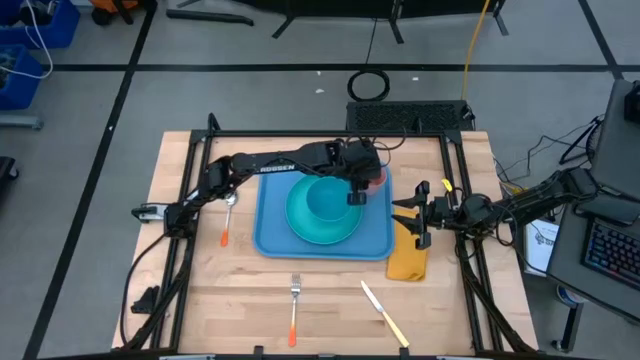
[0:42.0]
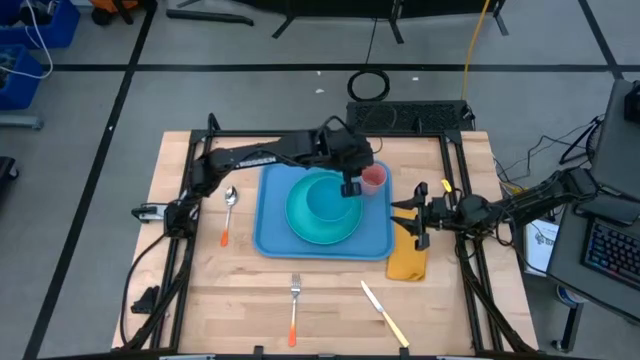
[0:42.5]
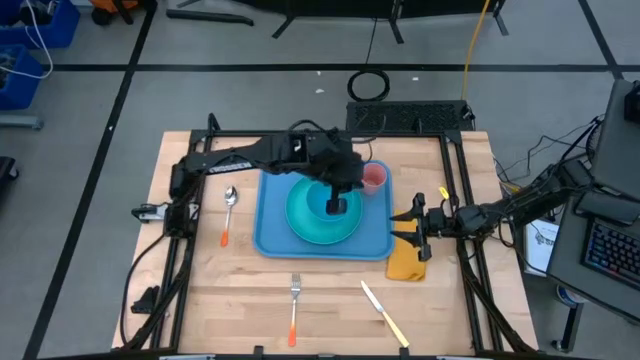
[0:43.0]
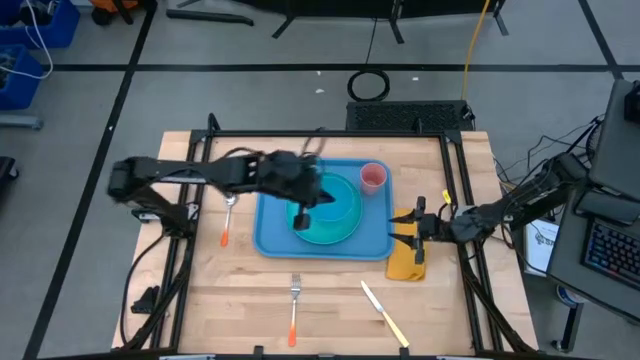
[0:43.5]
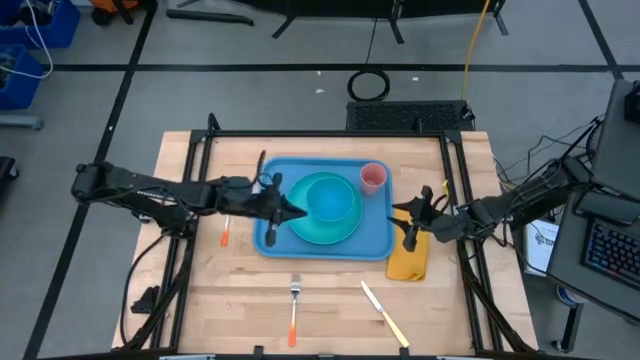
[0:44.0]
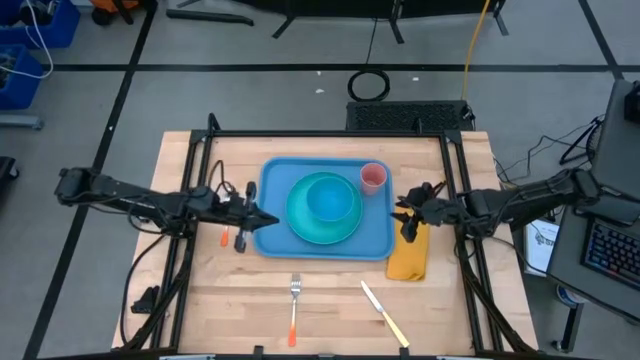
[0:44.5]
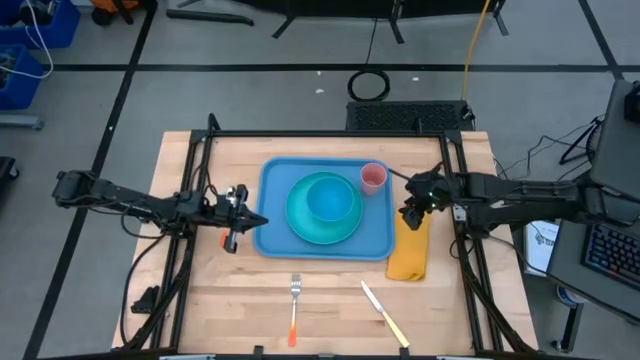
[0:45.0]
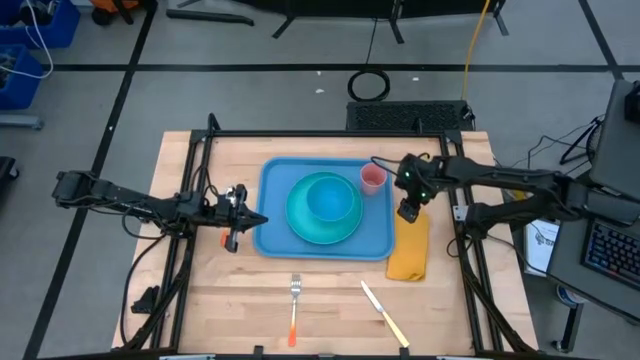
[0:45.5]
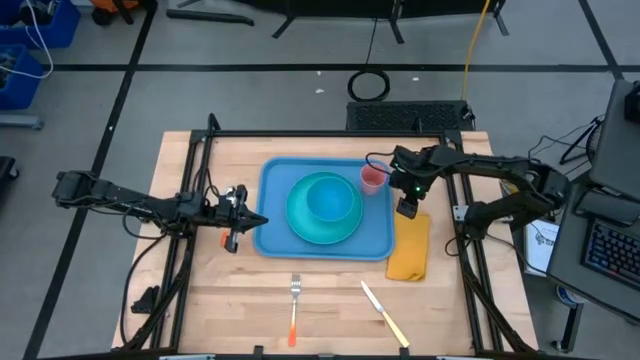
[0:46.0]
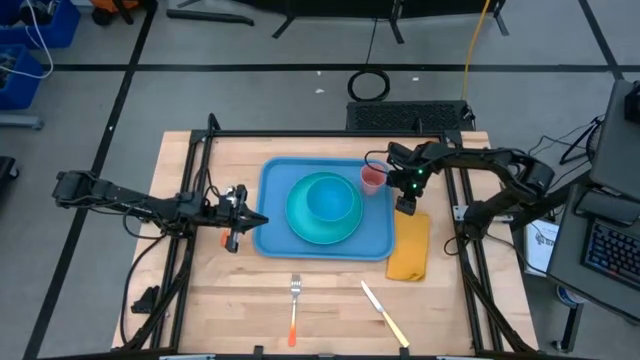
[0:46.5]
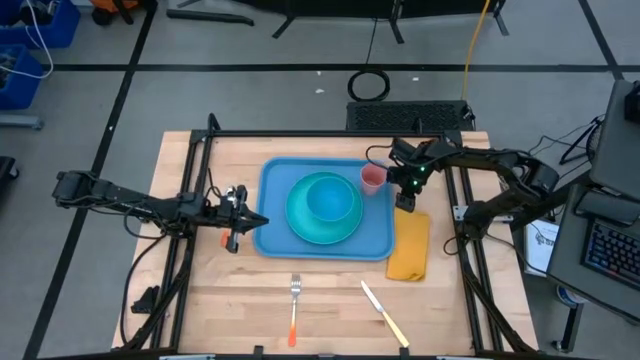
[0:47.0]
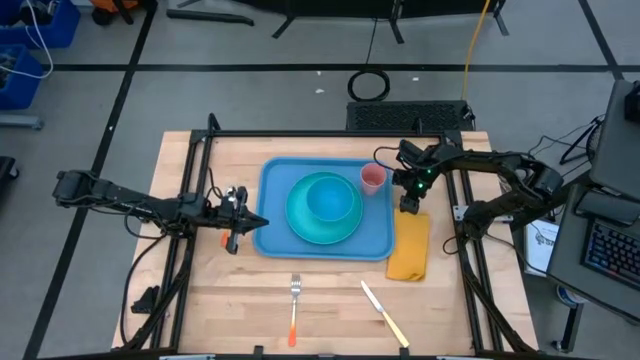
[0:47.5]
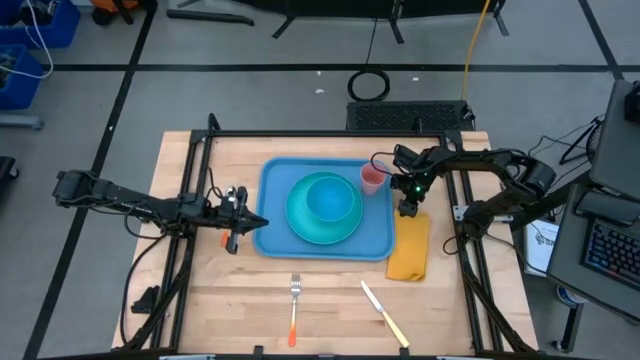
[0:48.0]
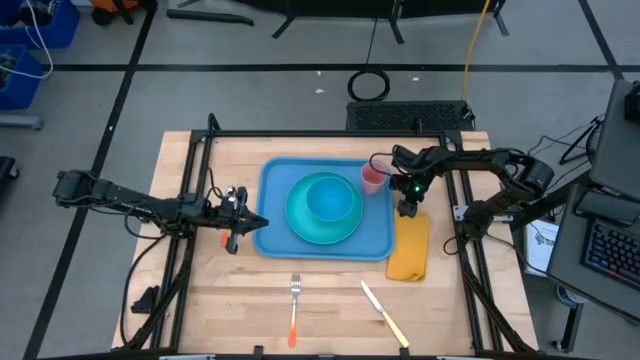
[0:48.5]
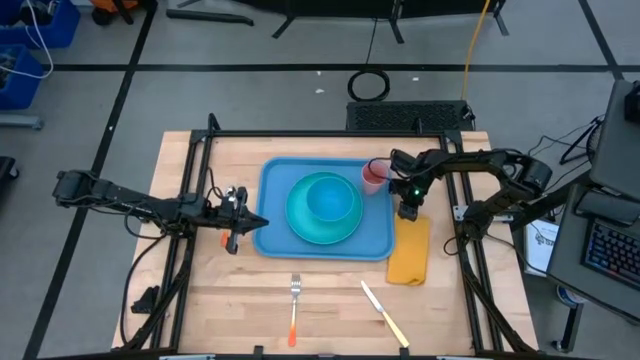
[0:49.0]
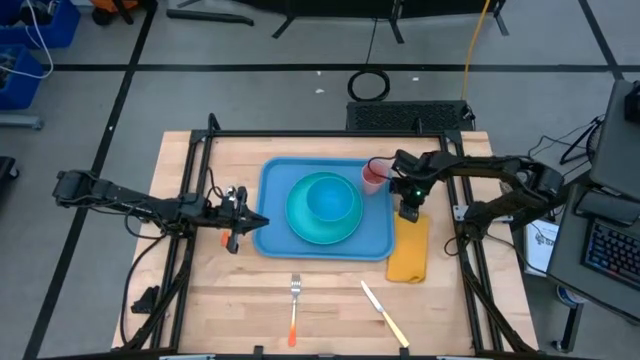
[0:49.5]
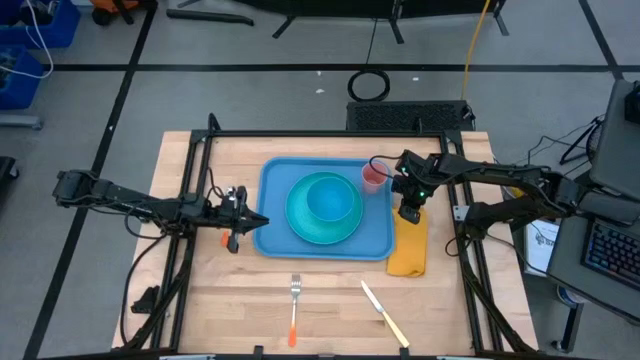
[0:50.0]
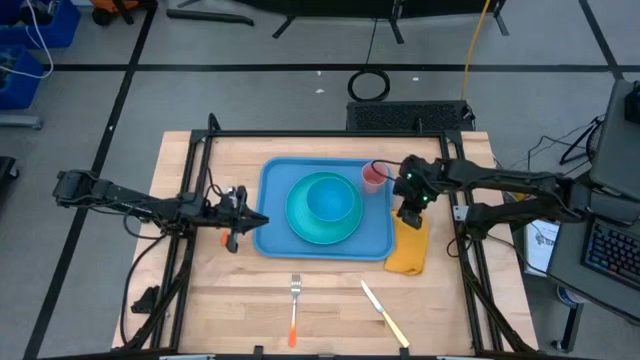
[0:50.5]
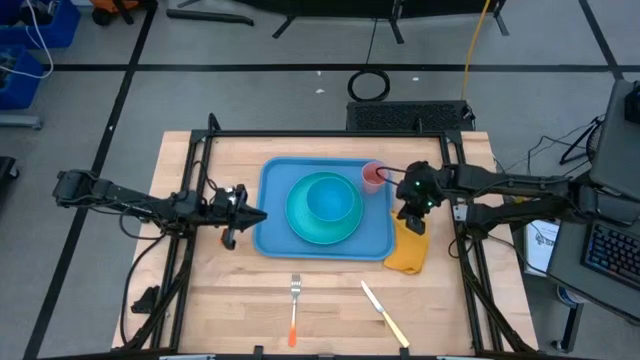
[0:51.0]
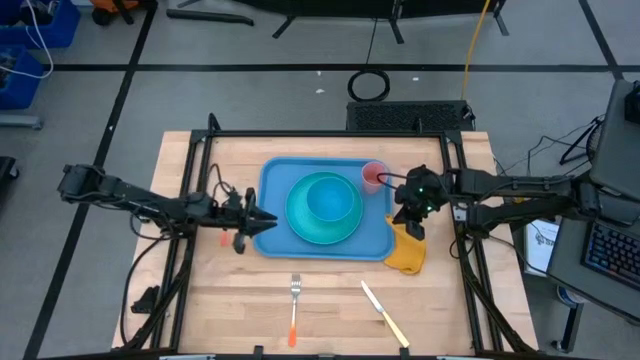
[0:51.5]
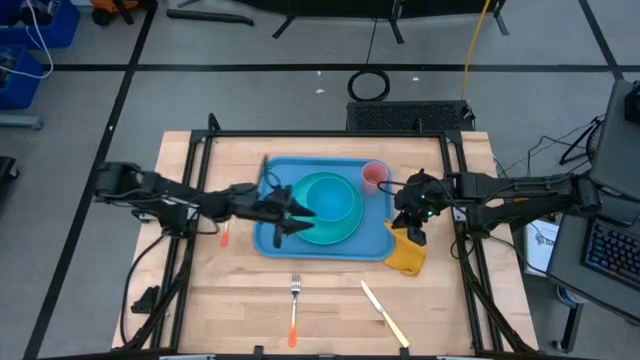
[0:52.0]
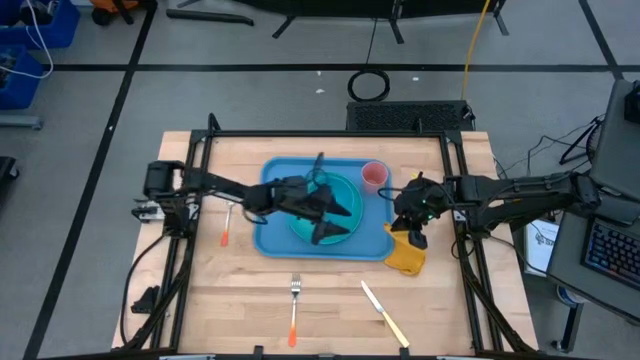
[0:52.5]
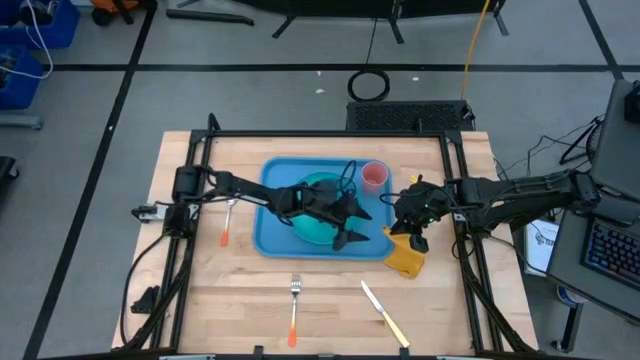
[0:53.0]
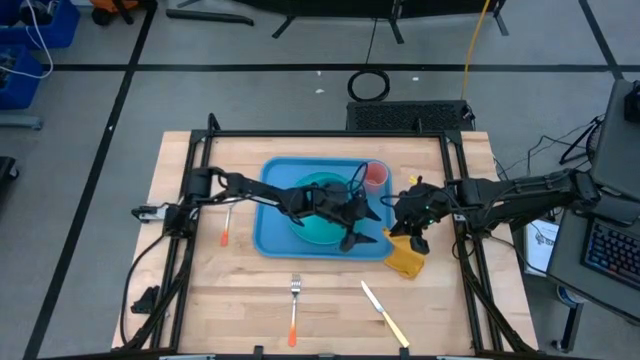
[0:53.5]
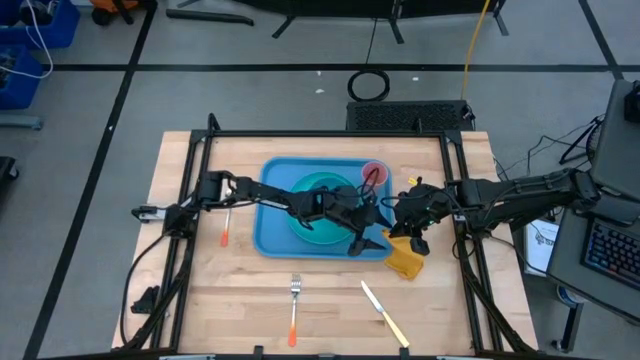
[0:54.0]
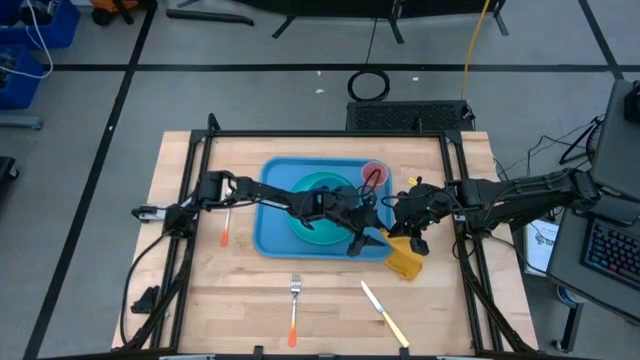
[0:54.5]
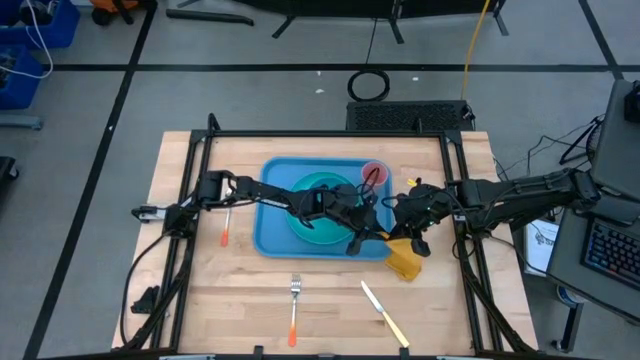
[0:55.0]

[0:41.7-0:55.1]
Task: Set up tray
Put the yellow napkin to the left of the green plate on the blue serving tray

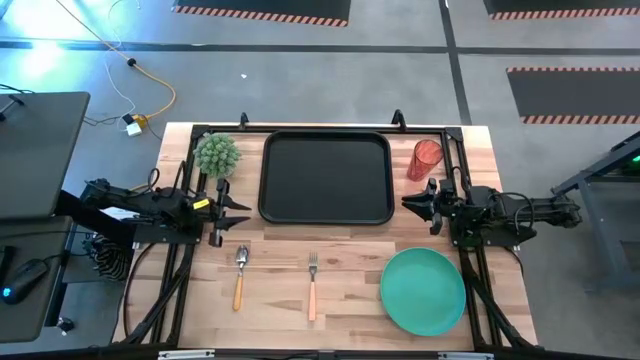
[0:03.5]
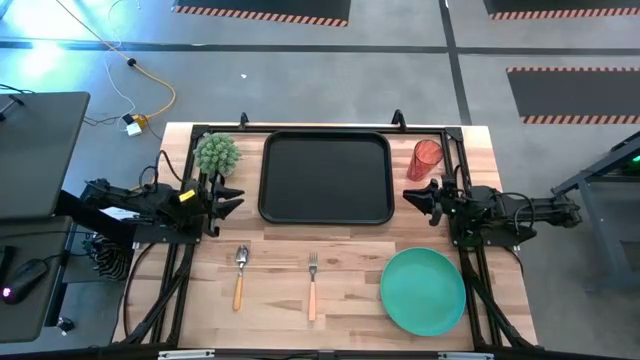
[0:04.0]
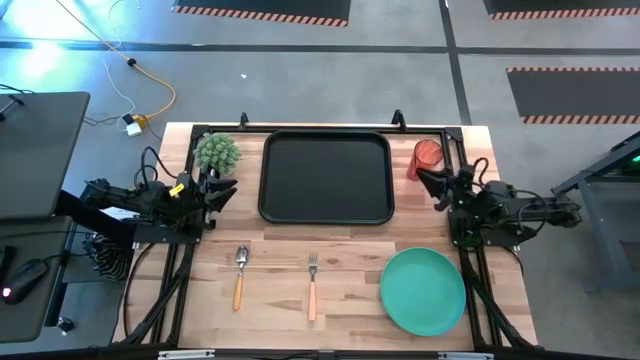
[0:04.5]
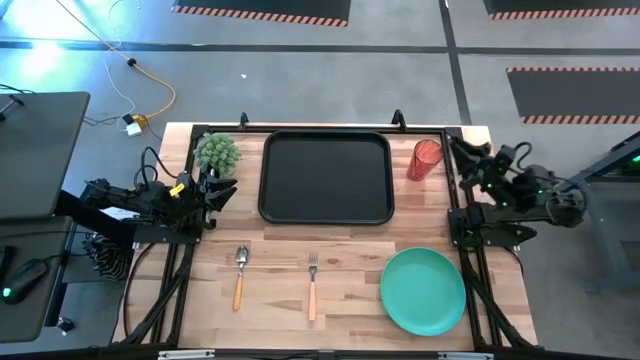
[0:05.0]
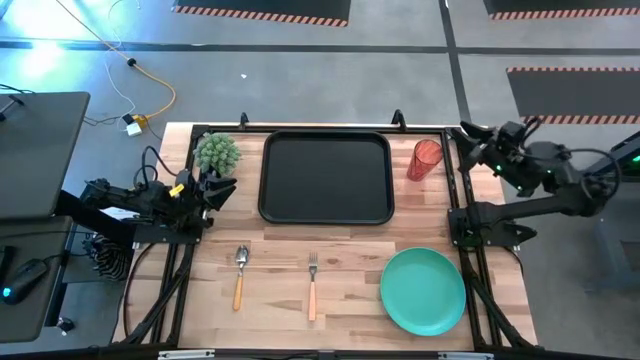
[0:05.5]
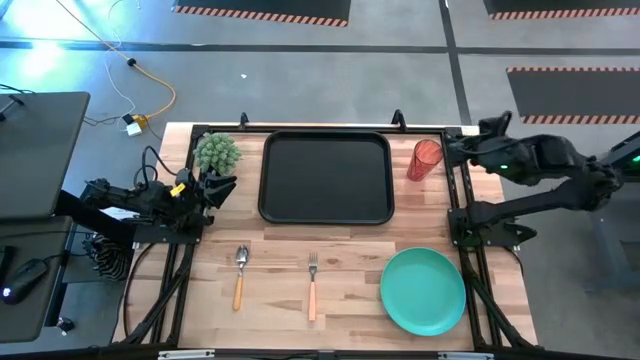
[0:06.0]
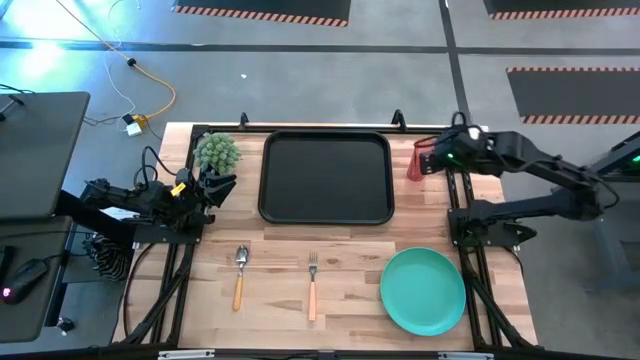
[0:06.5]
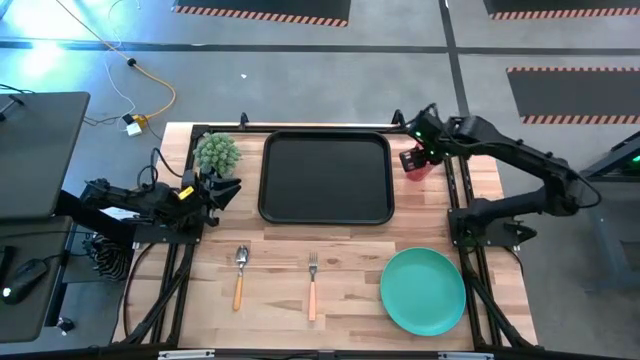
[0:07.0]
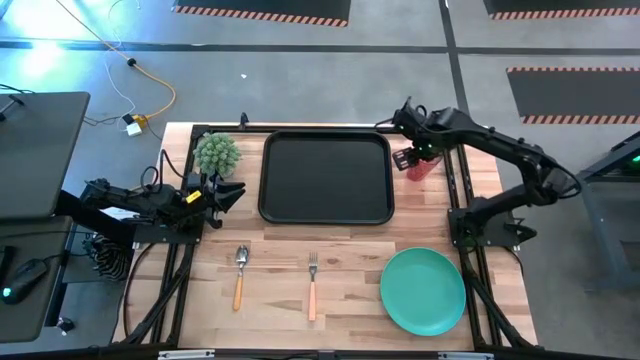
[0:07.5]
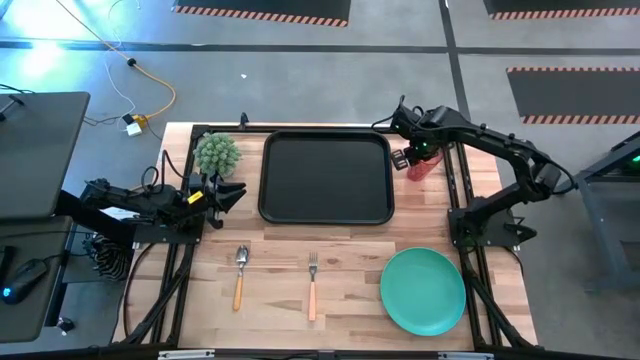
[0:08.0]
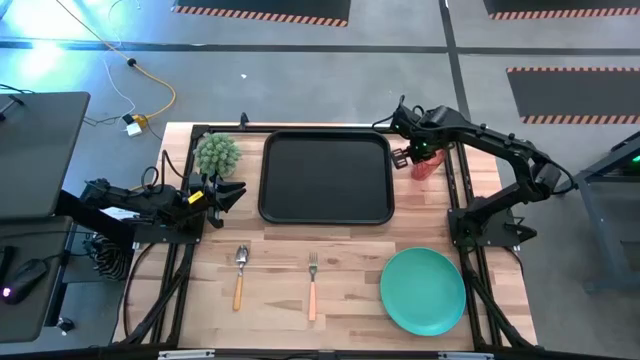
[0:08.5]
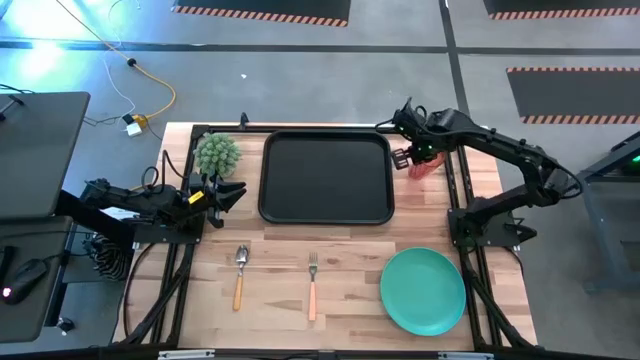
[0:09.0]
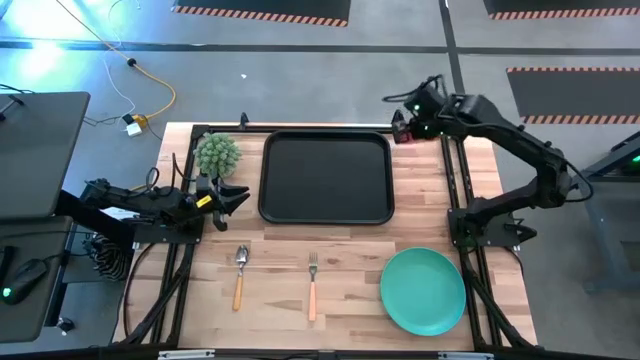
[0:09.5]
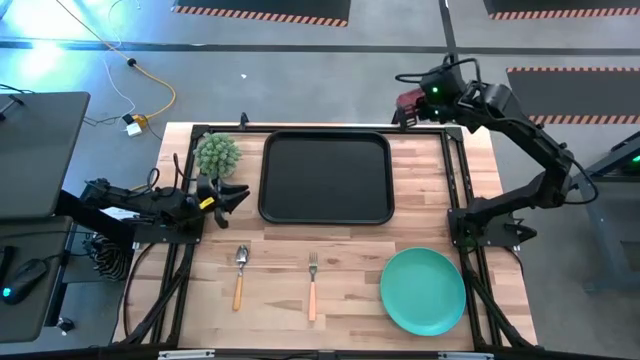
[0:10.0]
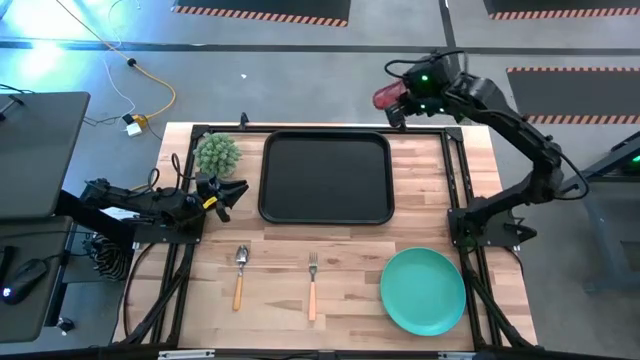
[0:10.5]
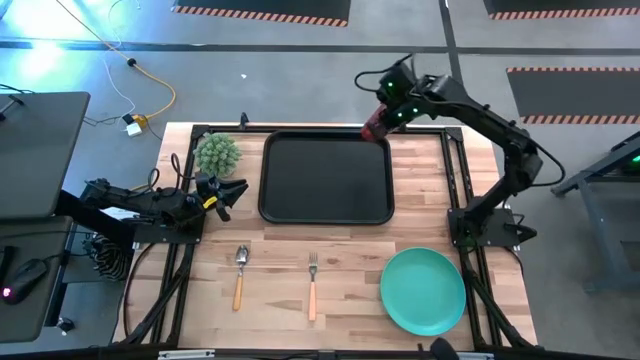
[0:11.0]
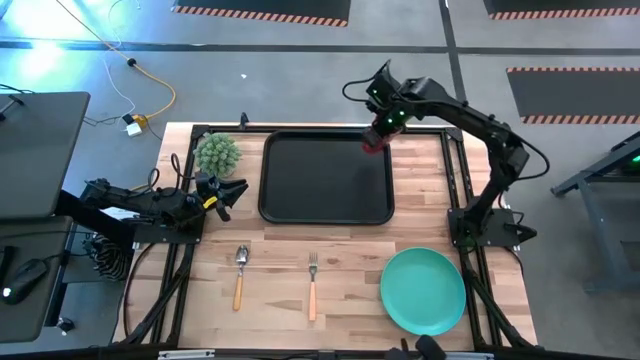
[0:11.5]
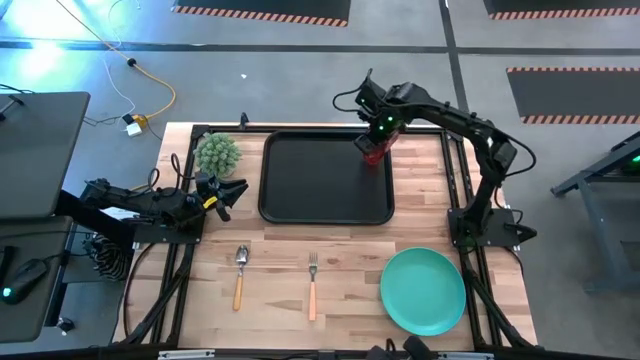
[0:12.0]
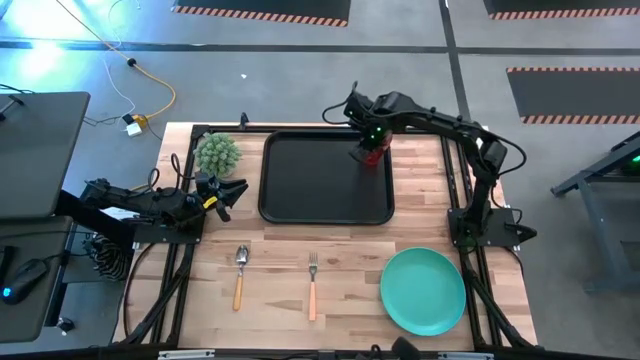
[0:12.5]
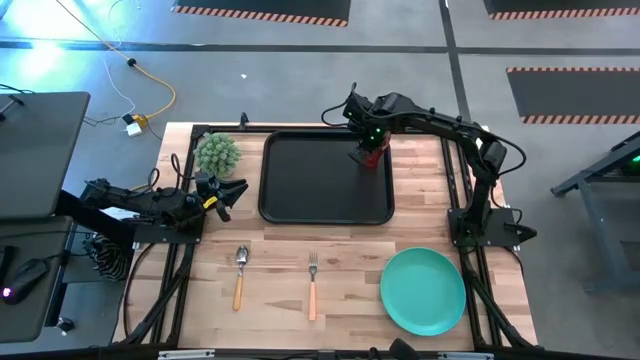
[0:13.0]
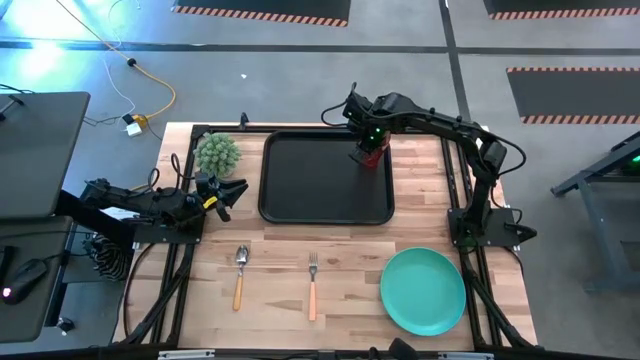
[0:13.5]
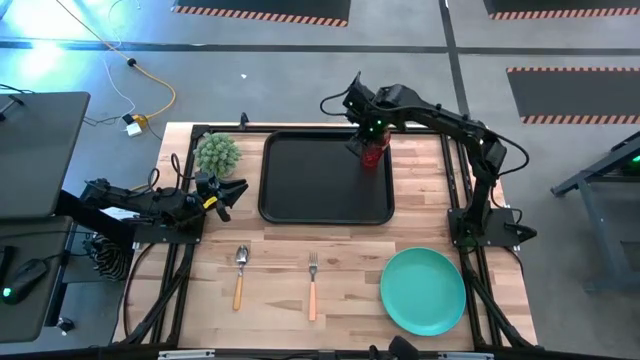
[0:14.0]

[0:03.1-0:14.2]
Task: Pick and place plate/cup/fork/spoon on tray
Put the orange glass on the black table tray
